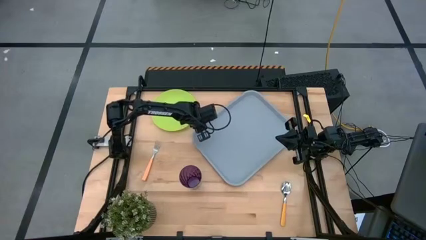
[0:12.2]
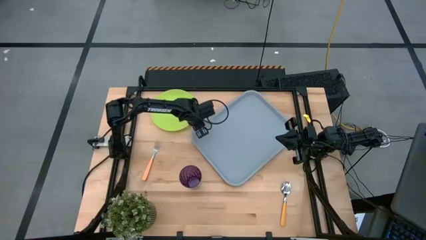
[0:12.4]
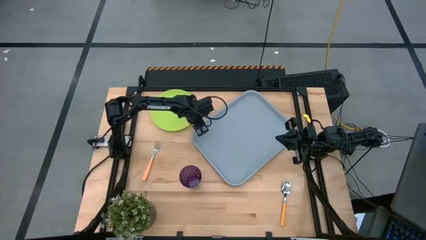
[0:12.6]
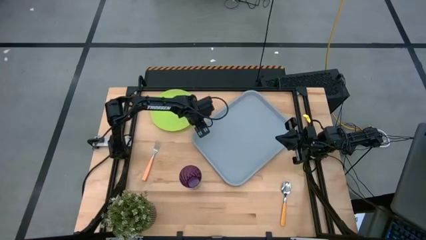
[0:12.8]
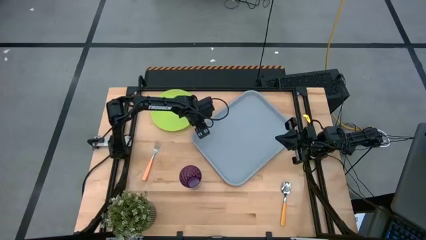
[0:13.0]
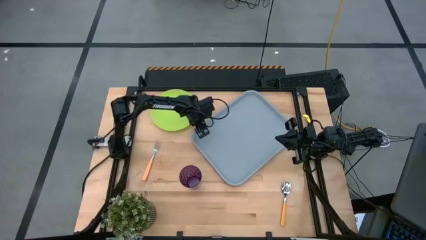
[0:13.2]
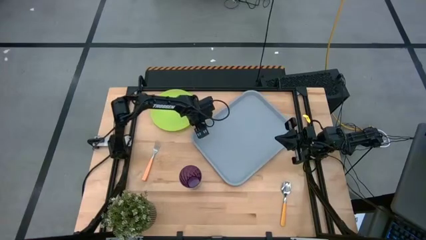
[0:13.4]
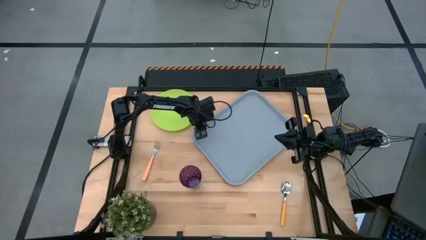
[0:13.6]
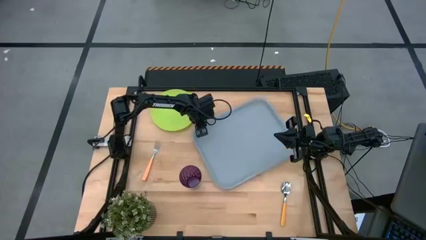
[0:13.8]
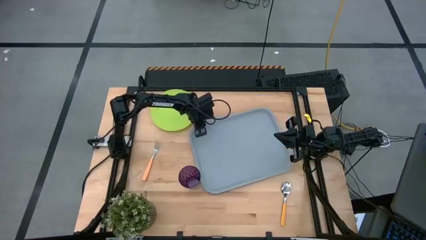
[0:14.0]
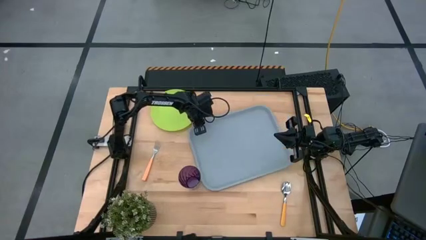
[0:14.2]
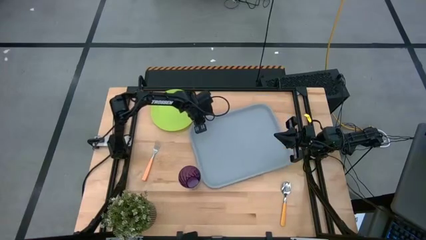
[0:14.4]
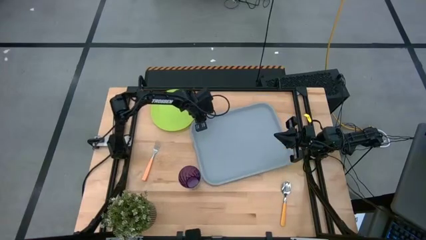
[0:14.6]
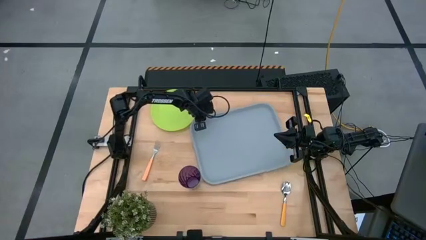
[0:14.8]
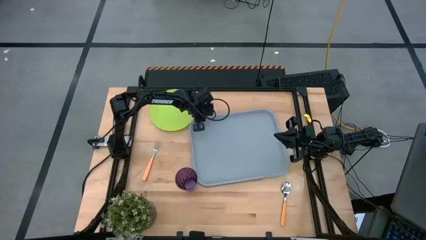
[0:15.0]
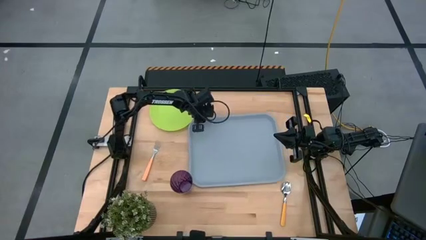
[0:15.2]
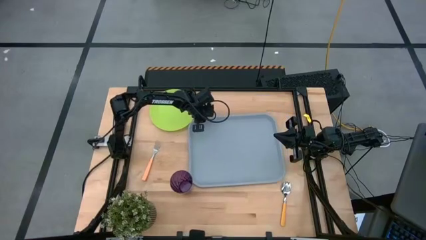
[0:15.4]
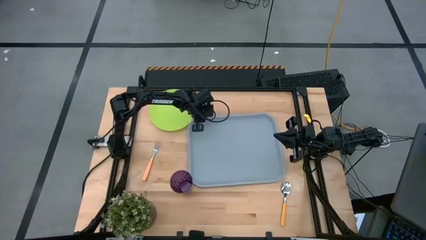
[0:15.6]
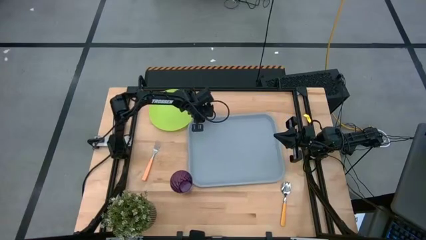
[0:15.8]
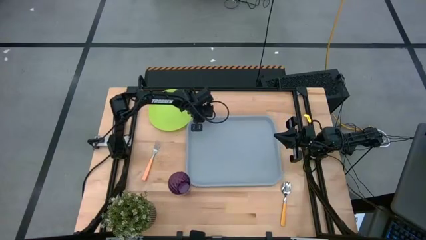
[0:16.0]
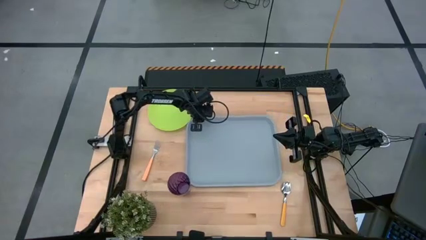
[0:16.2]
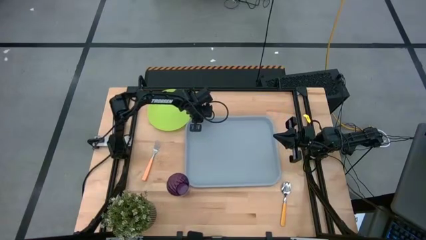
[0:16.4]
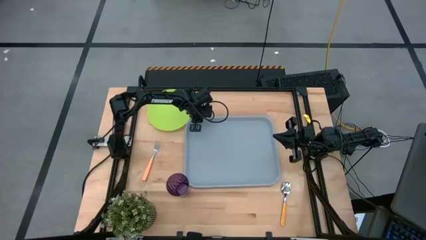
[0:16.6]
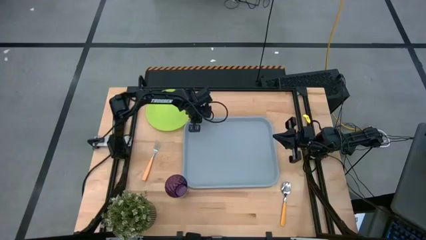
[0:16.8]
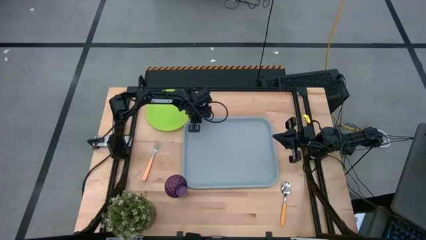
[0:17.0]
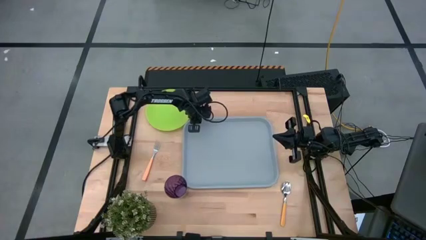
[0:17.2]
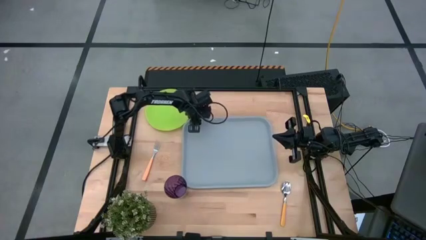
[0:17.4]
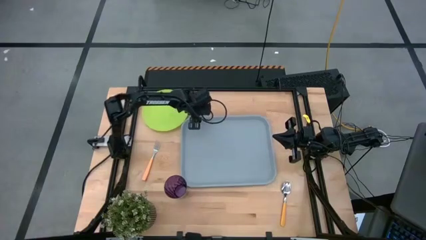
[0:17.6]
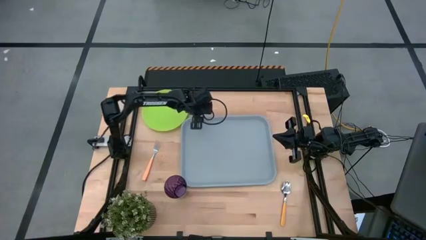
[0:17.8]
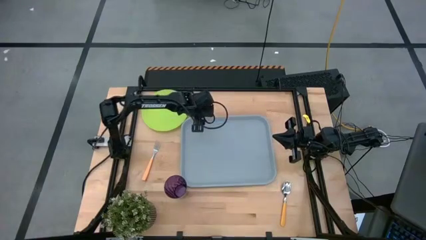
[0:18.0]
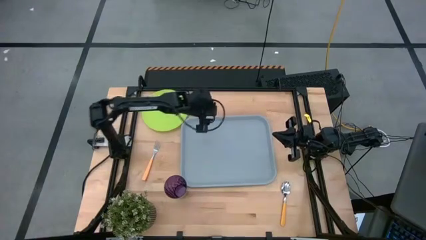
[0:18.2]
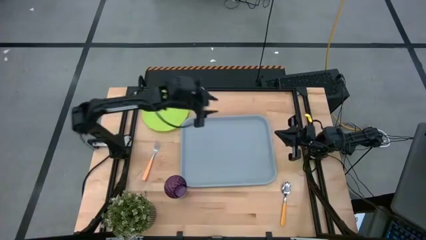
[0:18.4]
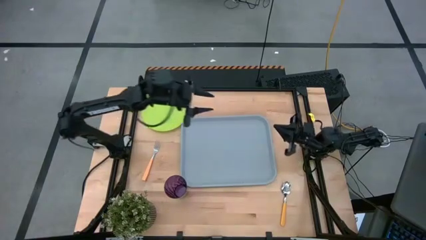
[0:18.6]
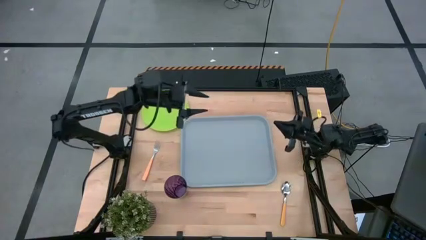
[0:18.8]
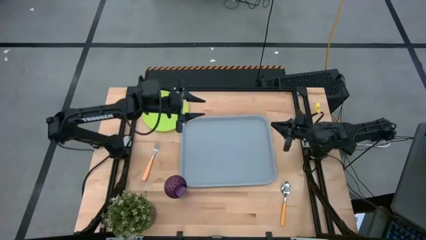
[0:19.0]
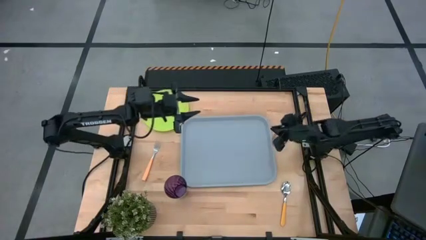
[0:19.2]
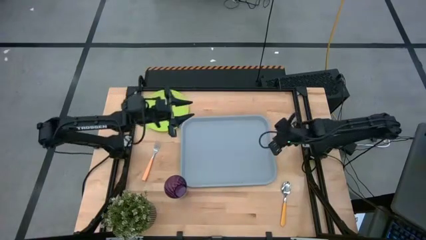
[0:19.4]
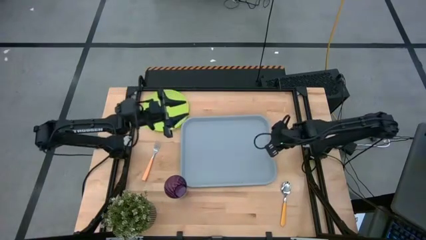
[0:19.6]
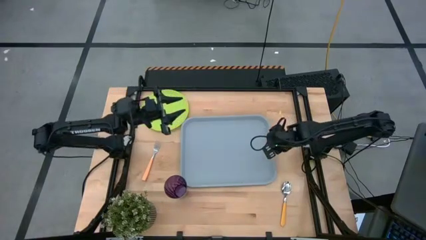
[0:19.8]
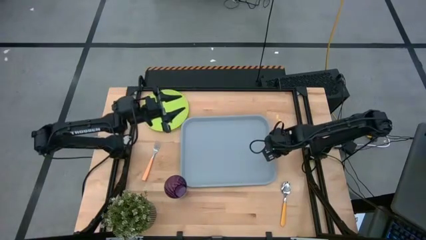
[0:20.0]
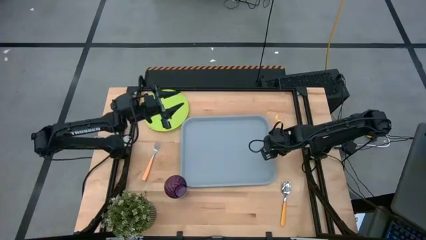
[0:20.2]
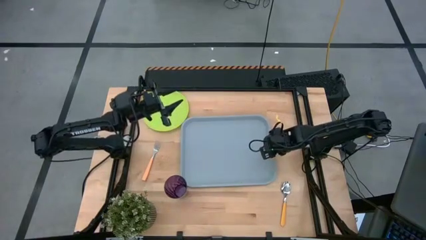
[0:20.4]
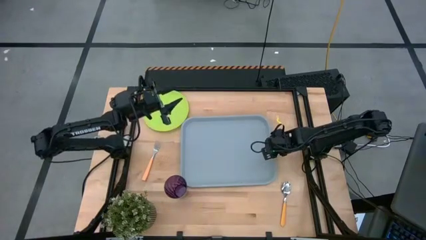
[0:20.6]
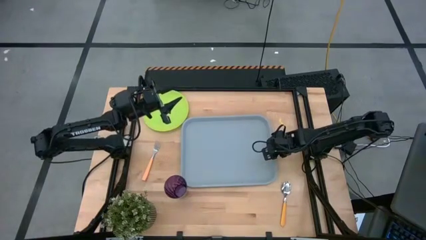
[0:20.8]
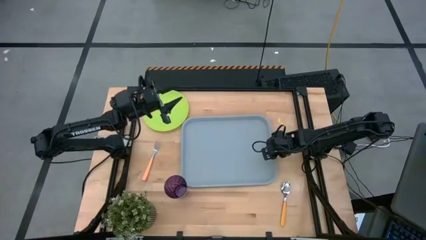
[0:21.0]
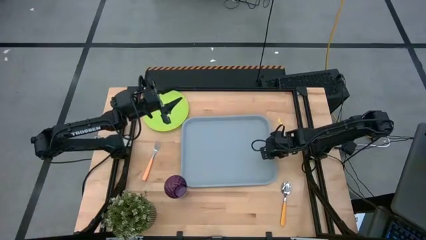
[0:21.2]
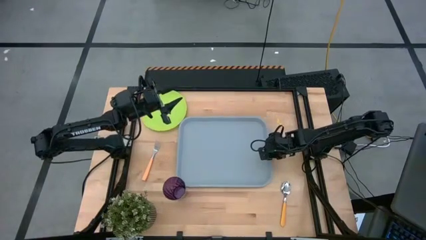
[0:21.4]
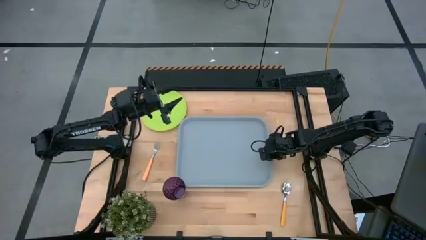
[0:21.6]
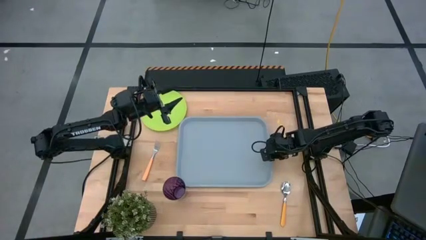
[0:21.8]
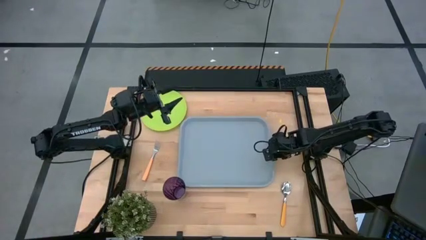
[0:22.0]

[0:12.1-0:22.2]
Task: Pick and place plate/cup/fork/spoon on tray
Prepare the gray serving tray

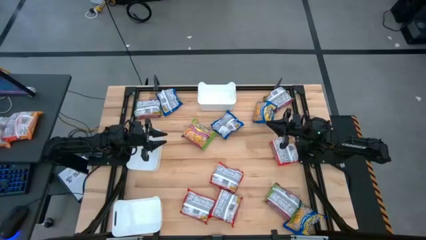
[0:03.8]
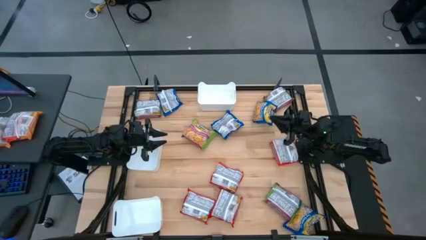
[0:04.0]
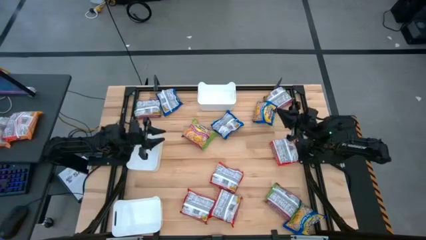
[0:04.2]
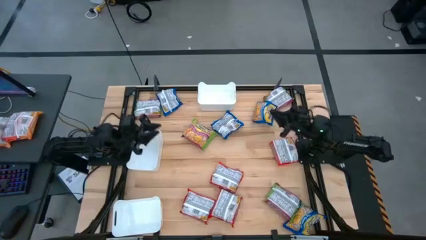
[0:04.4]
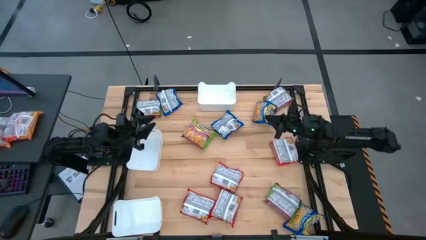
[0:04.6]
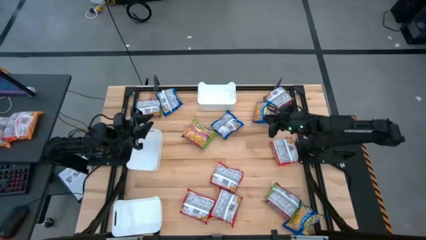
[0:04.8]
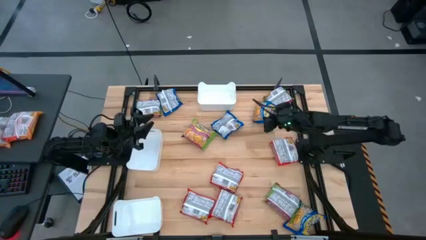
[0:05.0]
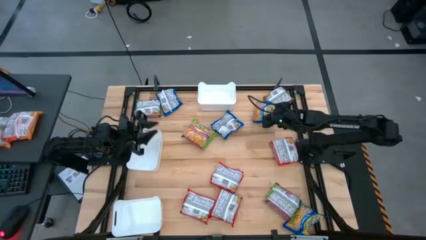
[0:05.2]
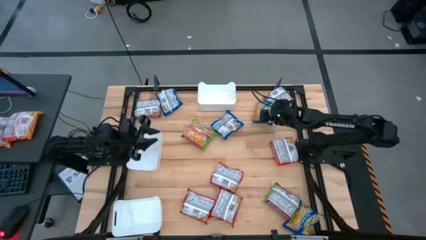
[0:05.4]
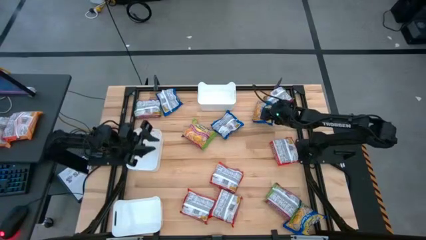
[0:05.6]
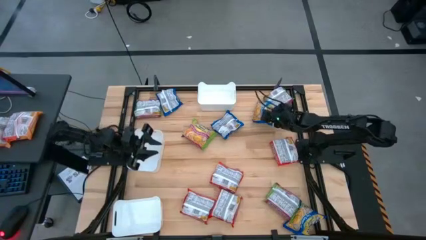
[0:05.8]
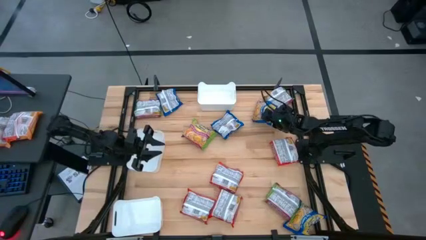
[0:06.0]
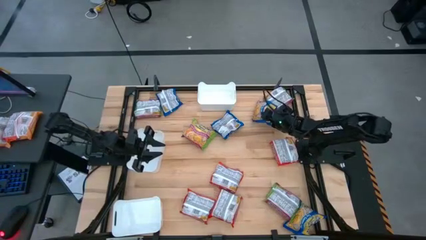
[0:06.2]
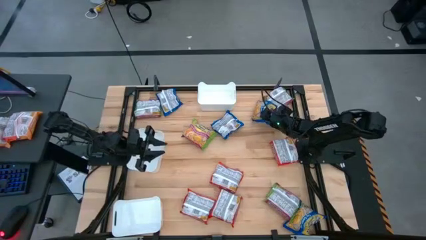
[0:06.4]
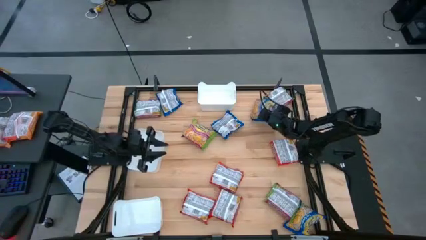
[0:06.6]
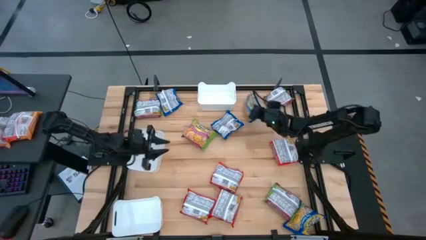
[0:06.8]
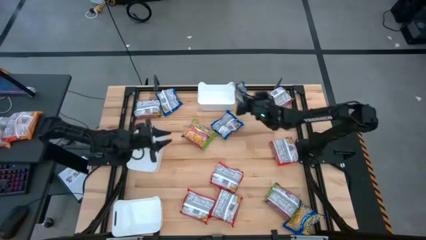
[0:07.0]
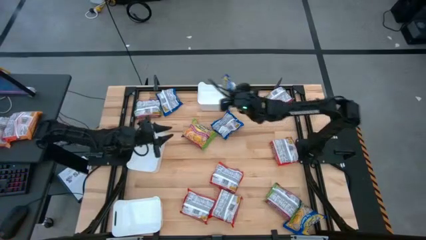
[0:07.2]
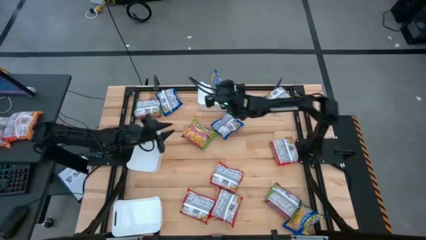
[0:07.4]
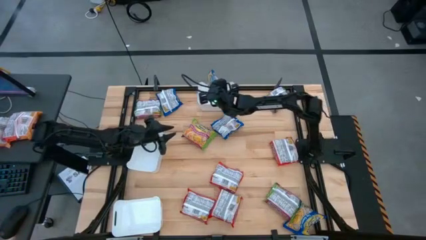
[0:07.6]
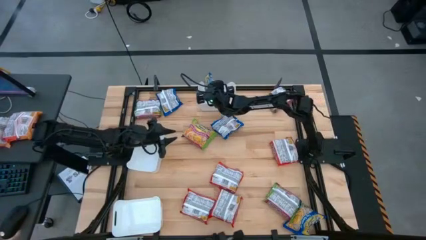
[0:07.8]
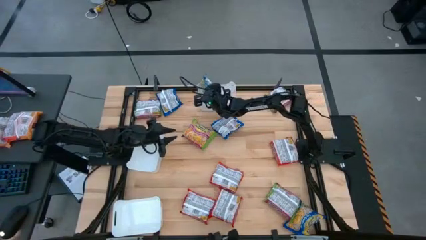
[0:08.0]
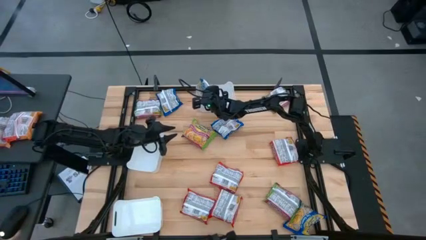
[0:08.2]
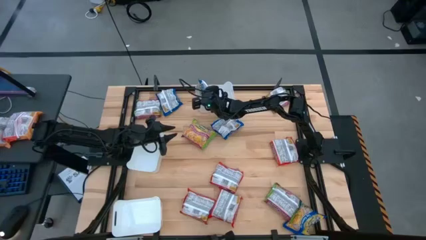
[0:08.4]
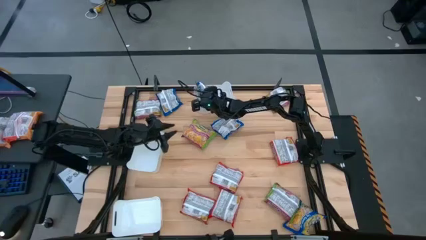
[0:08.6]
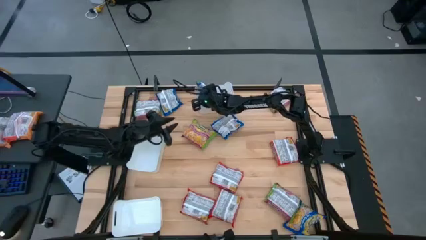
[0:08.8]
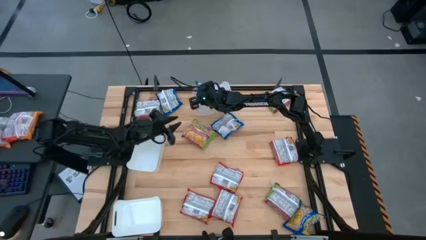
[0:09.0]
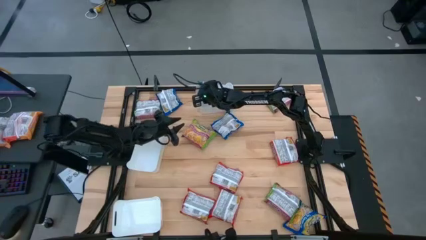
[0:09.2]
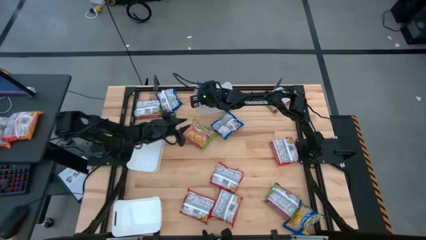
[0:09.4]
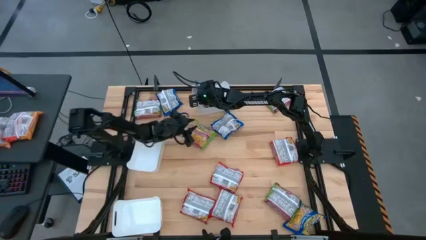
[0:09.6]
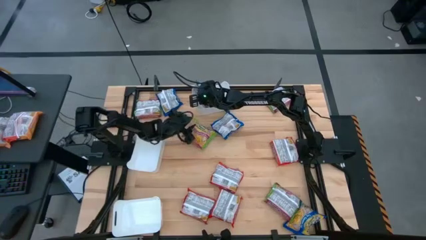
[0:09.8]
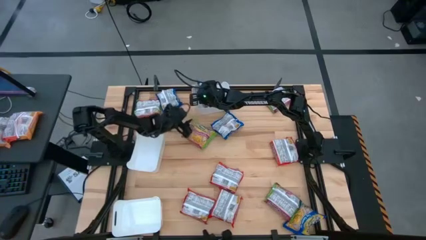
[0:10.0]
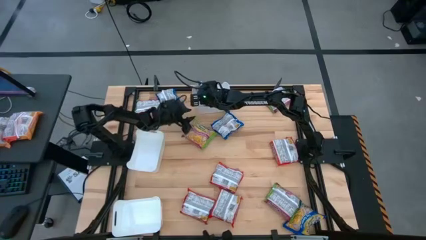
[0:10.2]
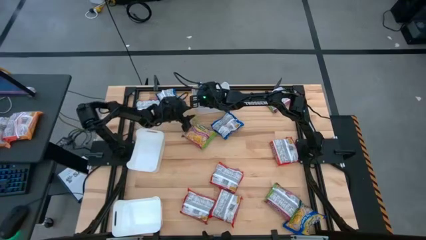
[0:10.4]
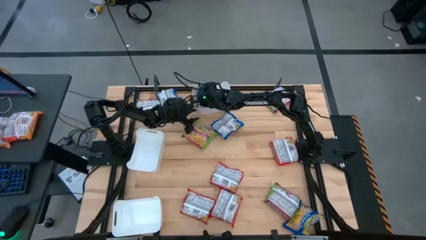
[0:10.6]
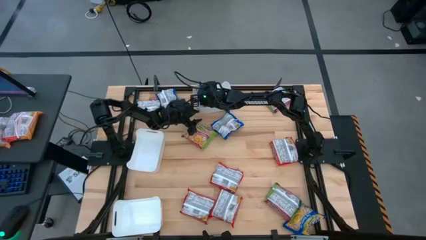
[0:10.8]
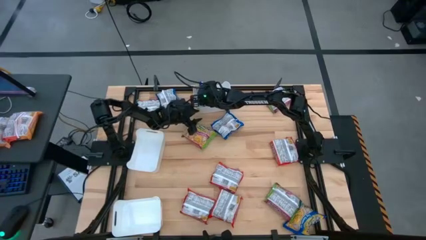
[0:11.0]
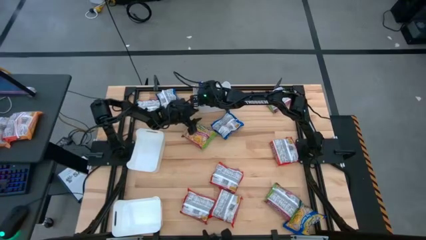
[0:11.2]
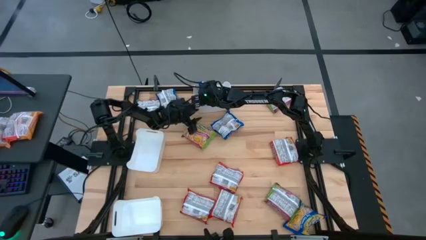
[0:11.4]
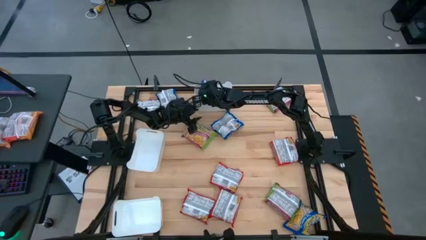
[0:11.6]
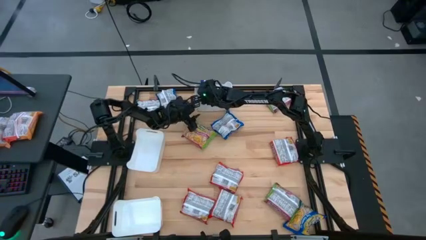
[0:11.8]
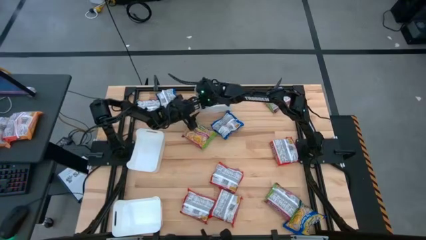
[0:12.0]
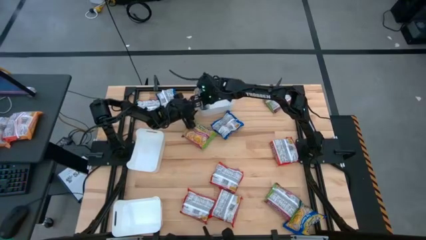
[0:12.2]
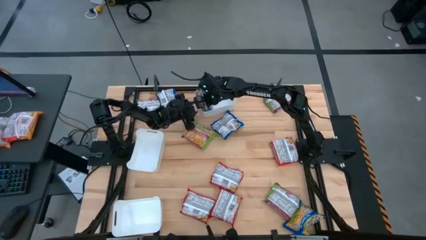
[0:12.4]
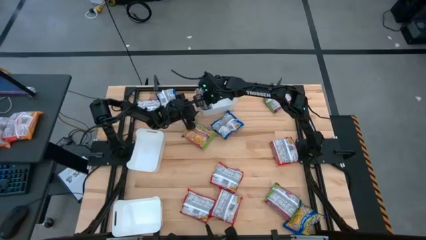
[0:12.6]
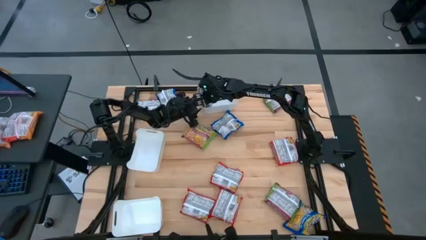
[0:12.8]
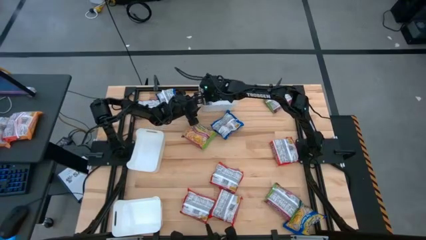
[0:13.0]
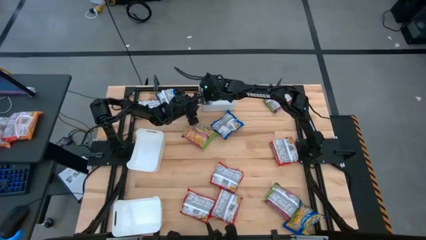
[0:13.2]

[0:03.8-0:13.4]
Task: Sort Maruchan noodles
Put the blue noodle pack into the top white bin
